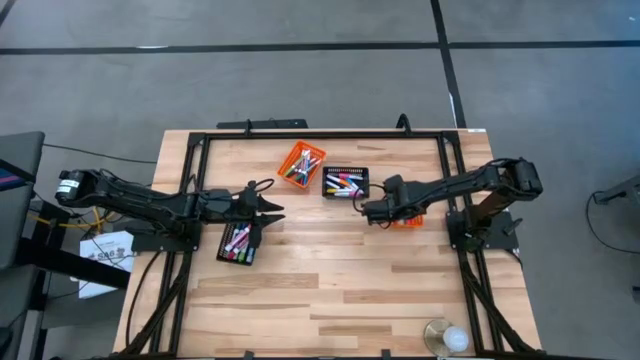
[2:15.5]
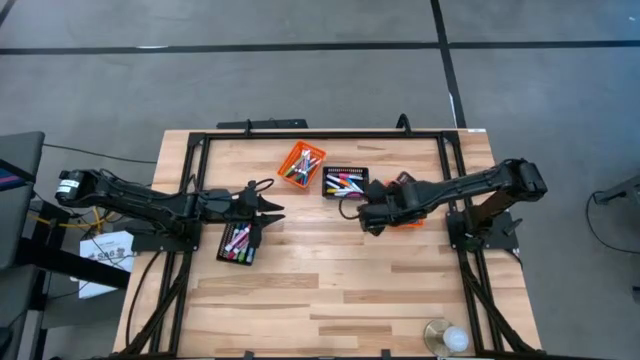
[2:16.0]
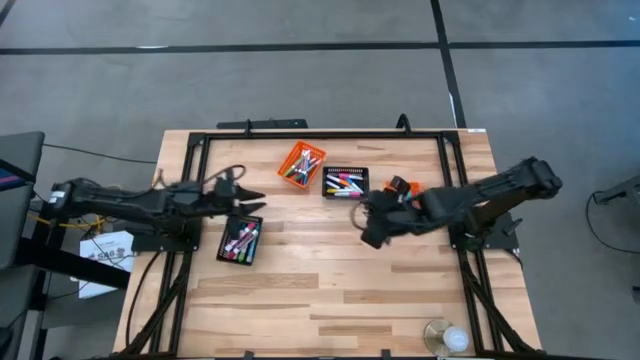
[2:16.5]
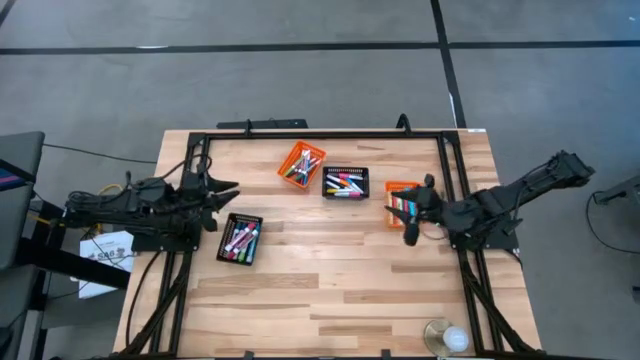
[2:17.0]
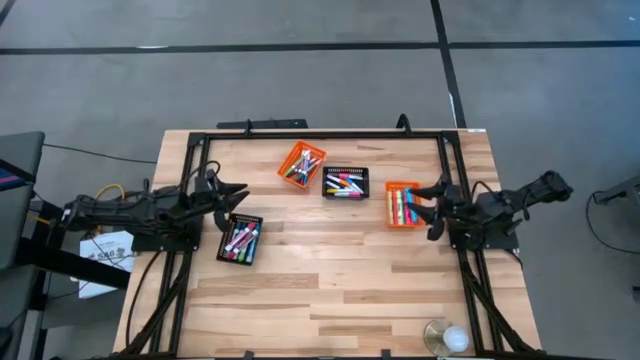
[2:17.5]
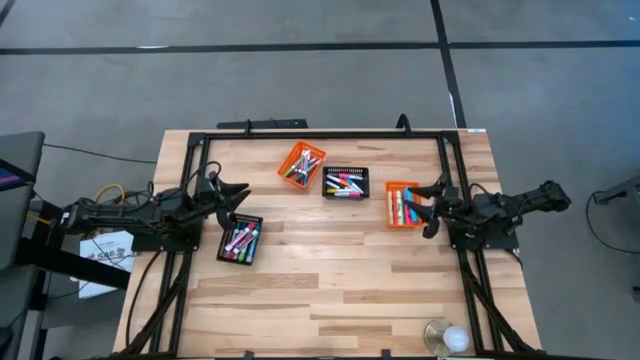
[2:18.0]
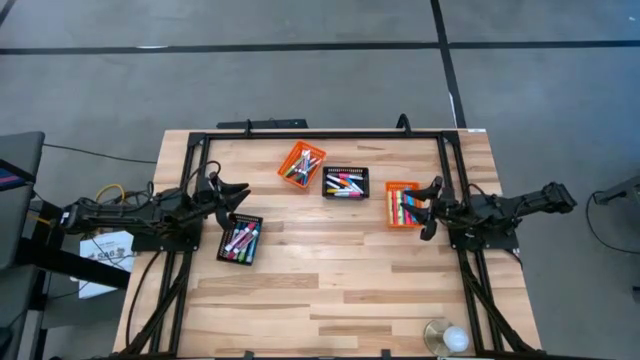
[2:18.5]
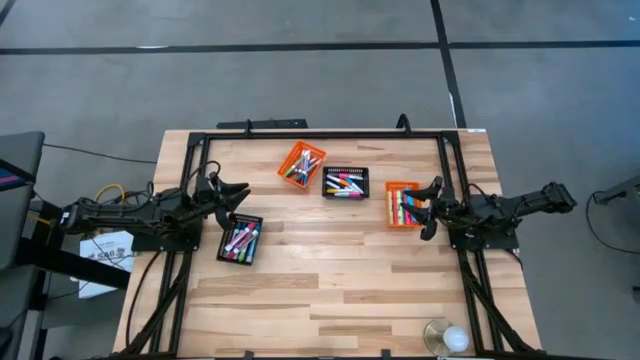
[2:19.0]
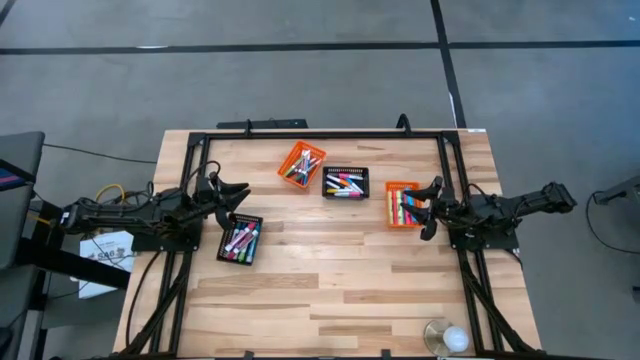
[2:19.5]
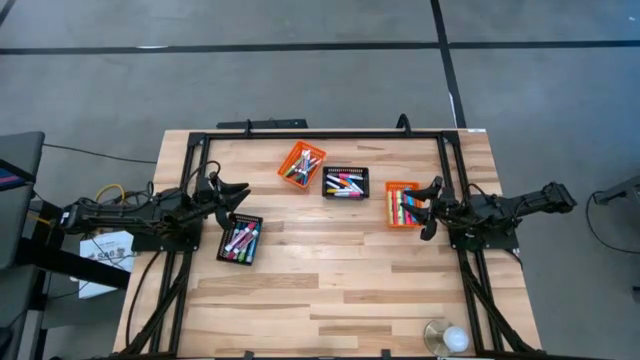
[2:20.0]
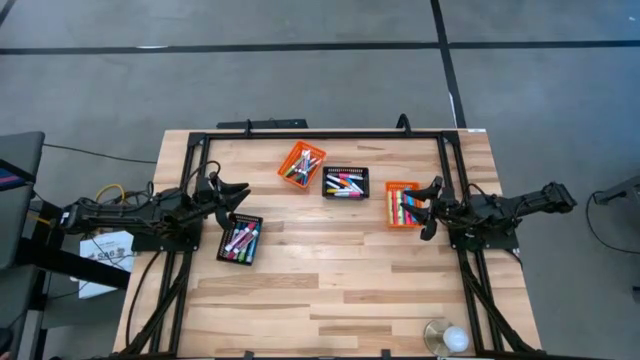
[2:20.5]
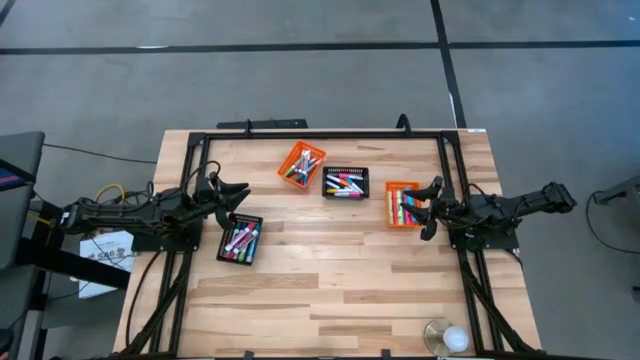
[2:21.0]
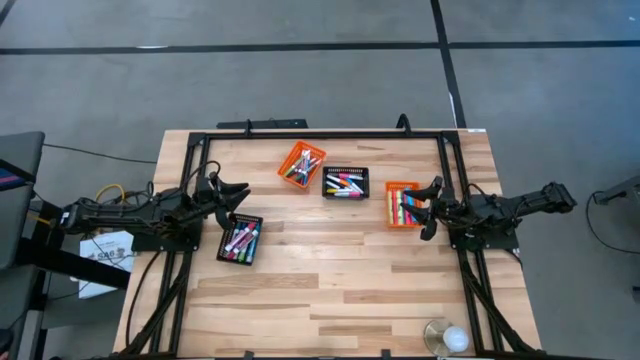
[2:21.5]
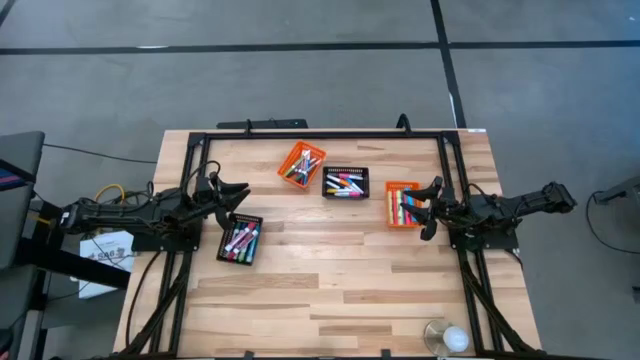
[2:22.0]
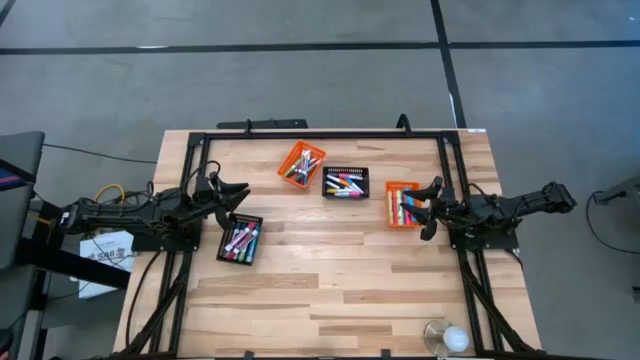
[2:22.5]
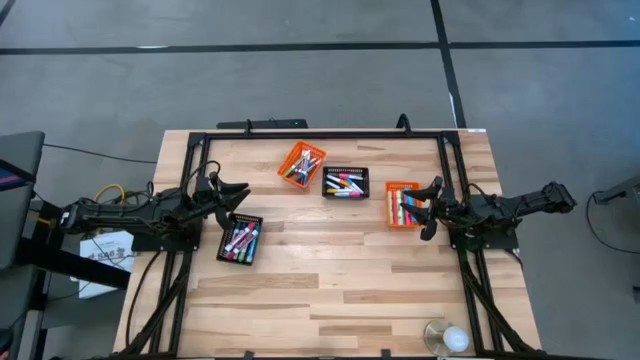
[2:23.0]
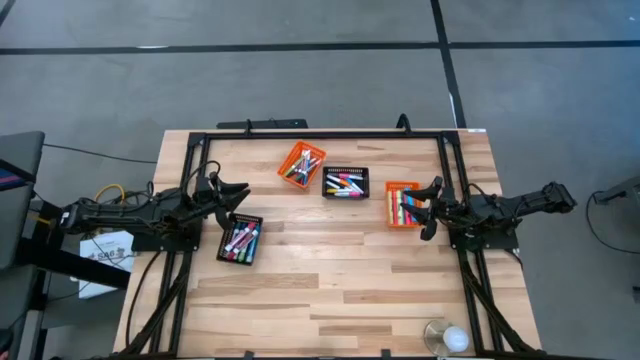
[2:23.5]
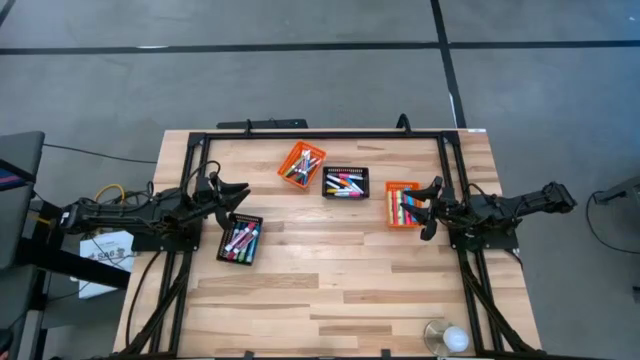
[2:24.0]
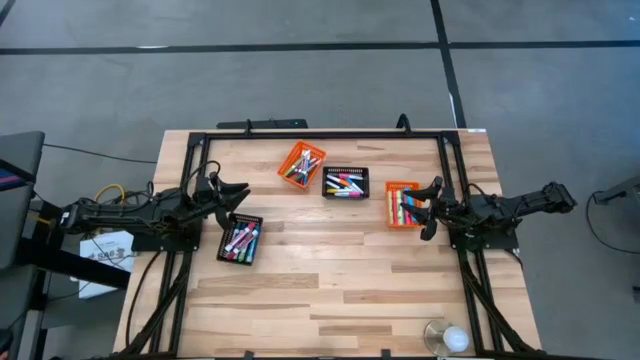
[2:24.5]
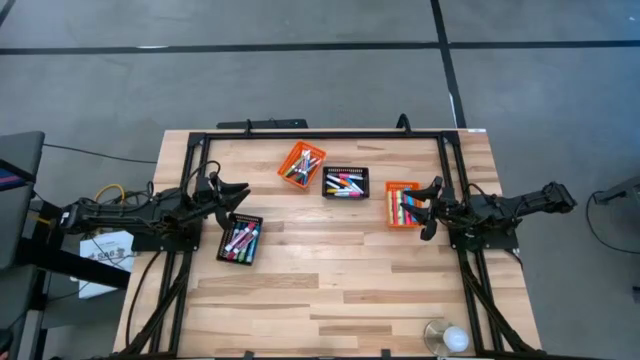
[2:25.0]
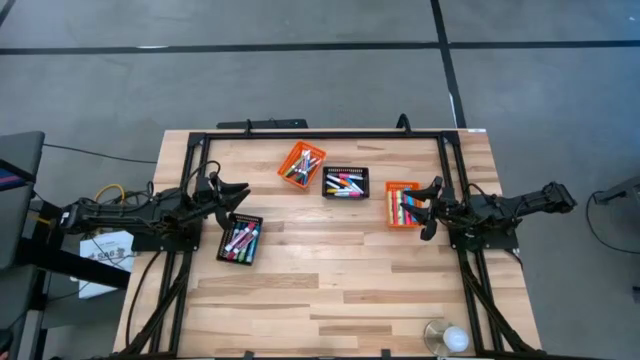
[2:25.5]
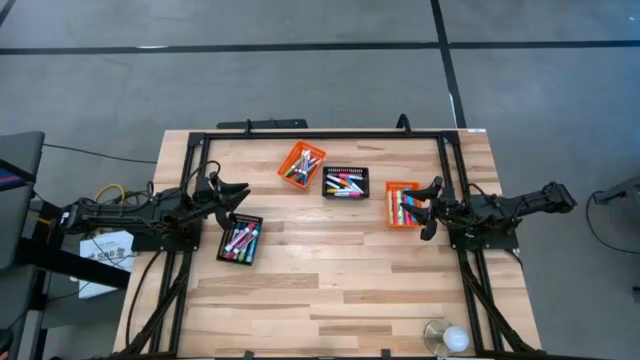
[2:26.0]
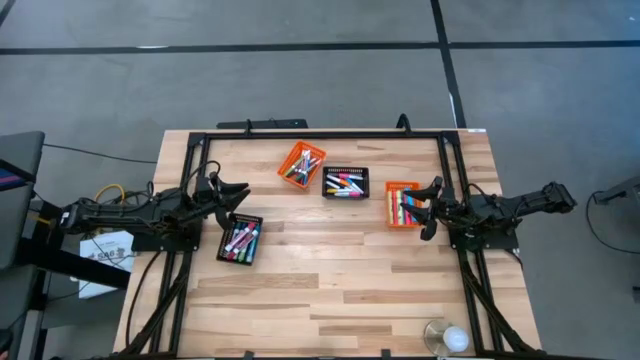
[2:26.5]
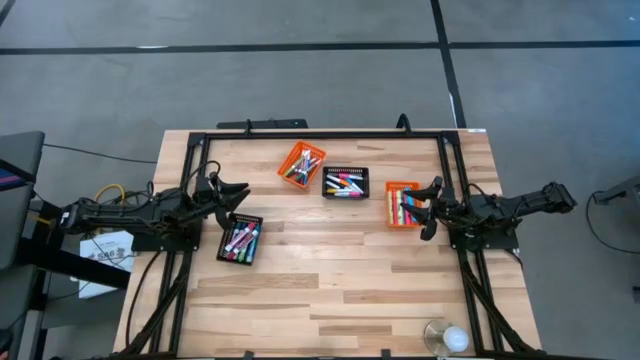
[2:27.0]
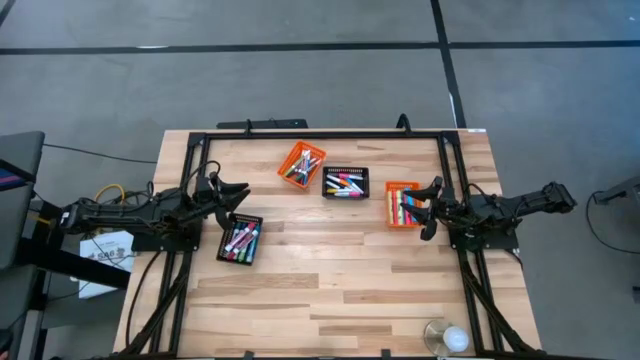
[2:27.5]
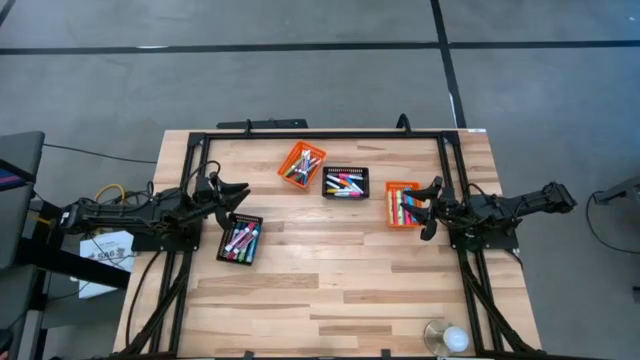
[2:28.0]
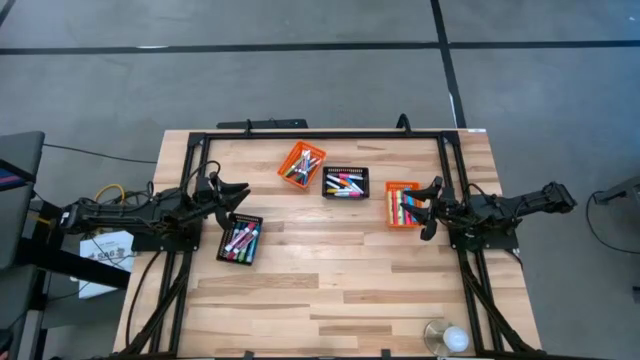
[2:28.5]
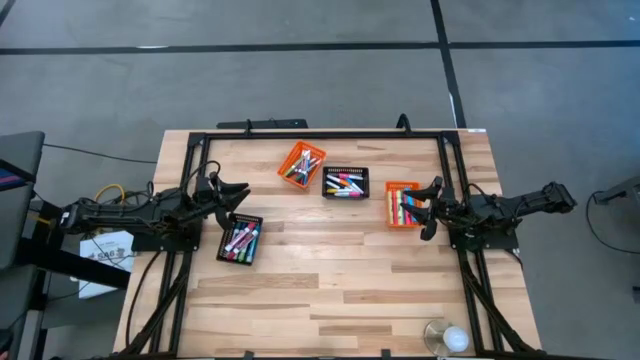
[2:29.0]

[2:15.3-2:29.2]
Task: Pick & Place Markers
Return to Home Position

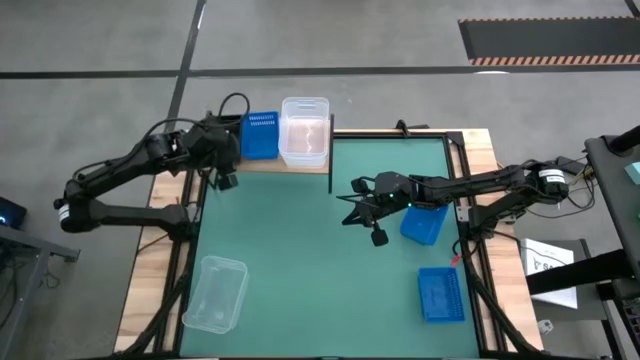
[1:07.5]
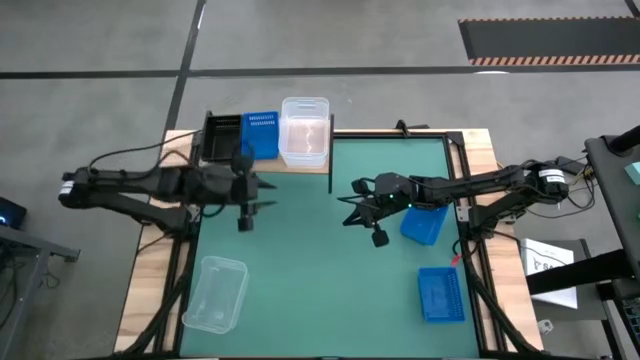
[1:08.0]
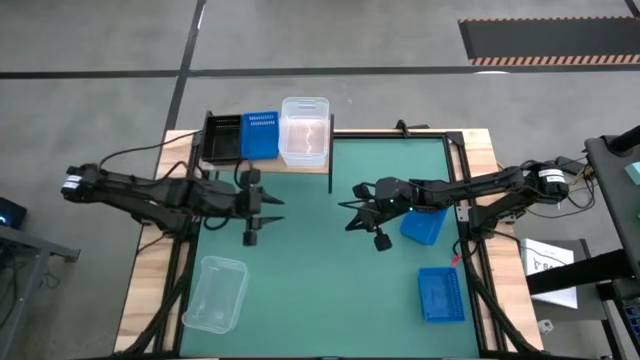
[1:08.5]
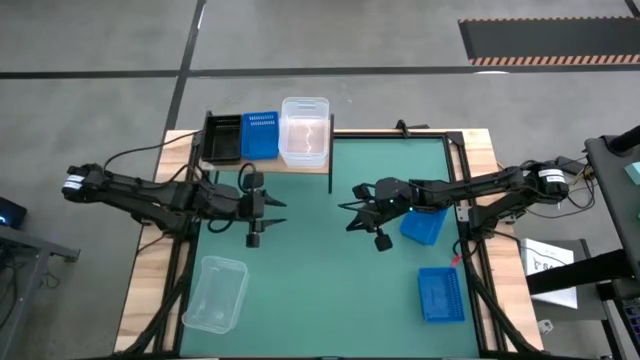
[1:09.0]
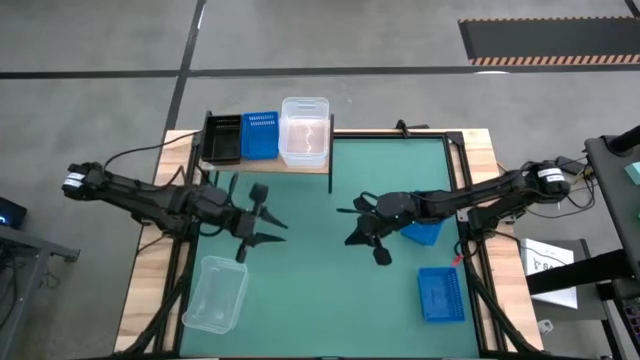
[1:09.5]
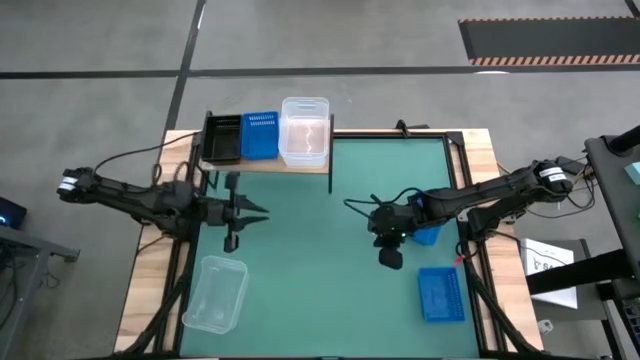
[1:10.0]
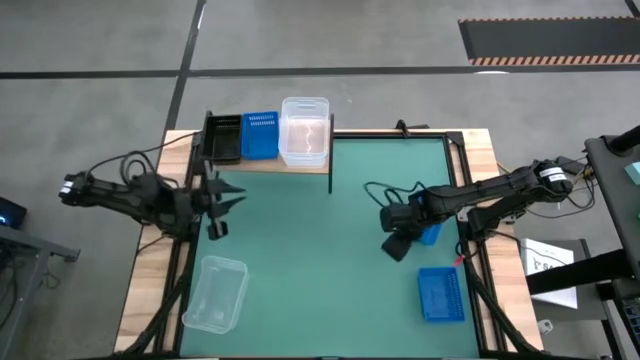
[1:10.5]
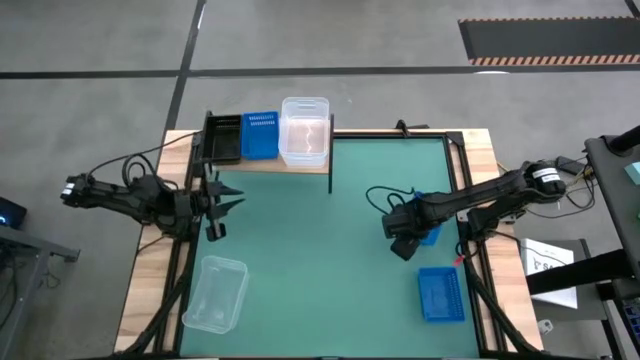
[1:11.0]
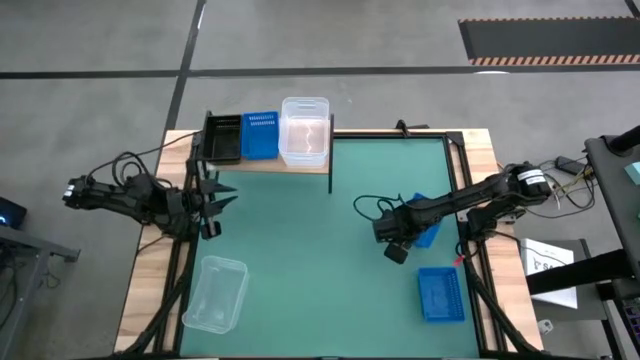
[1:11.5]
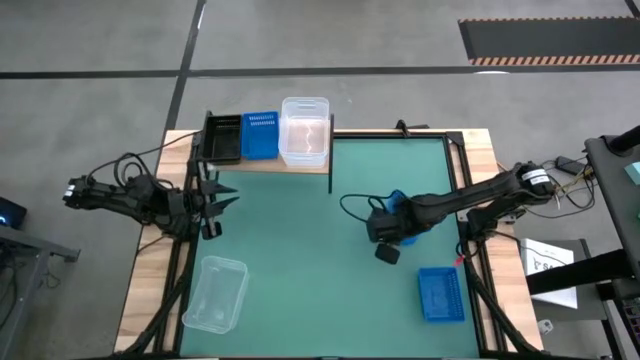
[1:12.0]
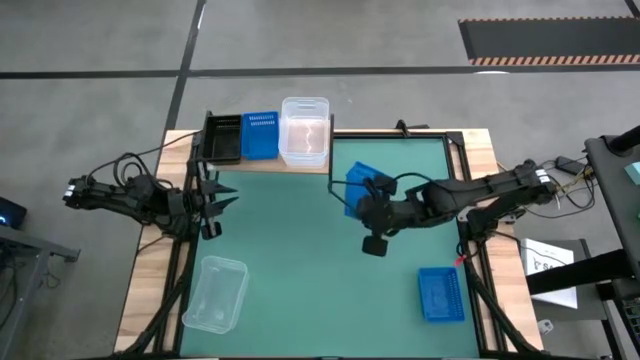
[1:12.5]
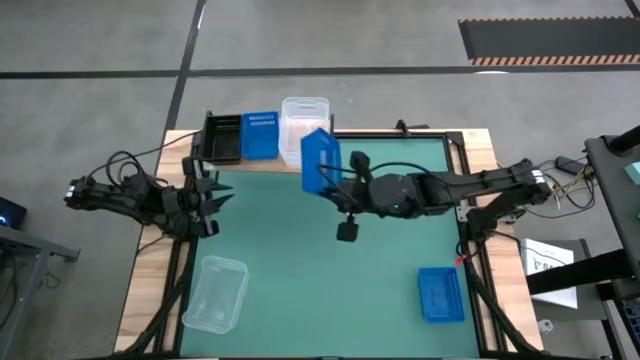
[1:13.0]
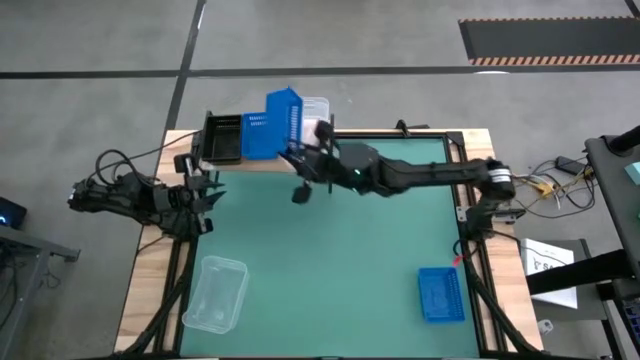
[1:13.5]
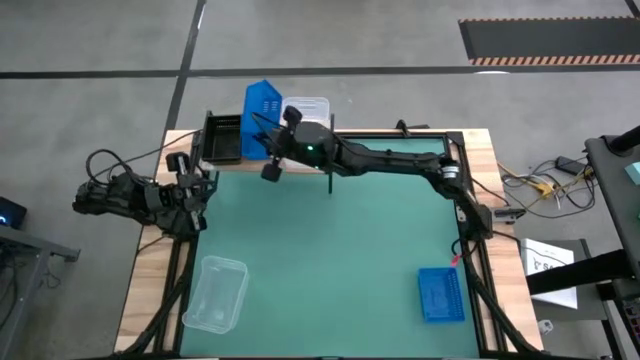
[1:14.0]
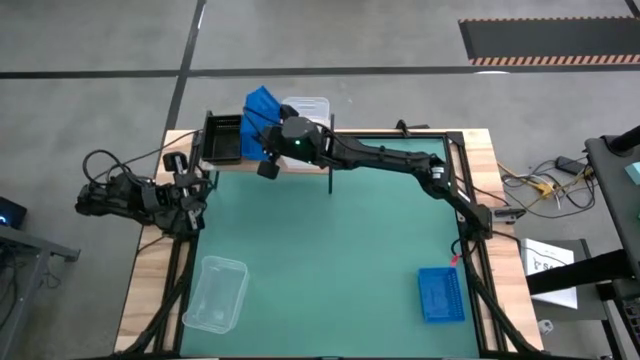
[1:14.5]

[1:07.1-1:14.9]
Task: Stack baskets on shelf by color
Stack the top blue bin on top of the blue bin on the shelf

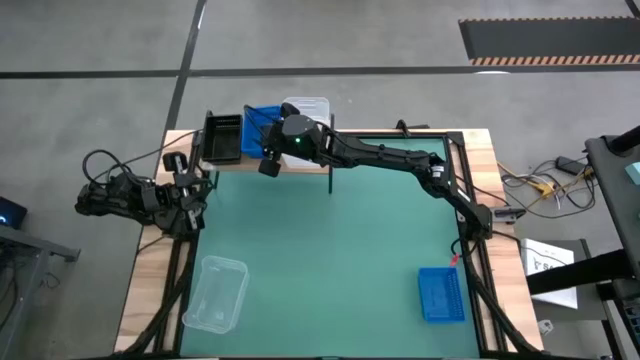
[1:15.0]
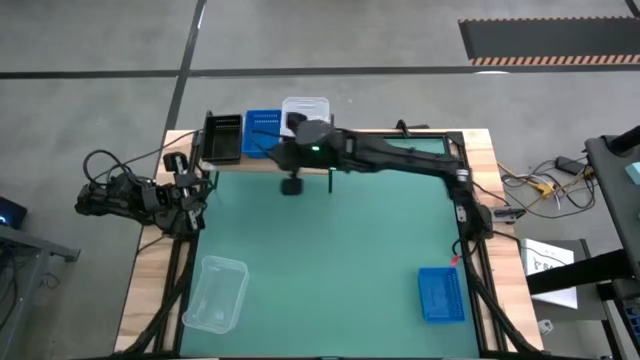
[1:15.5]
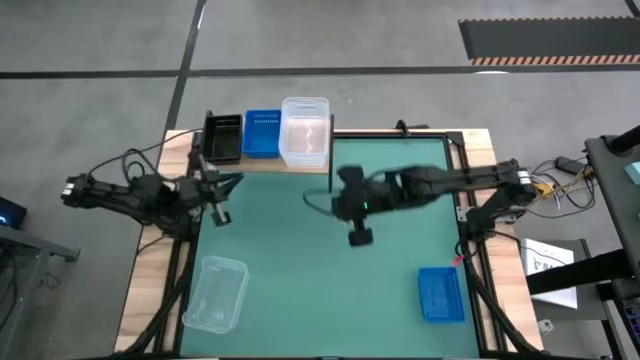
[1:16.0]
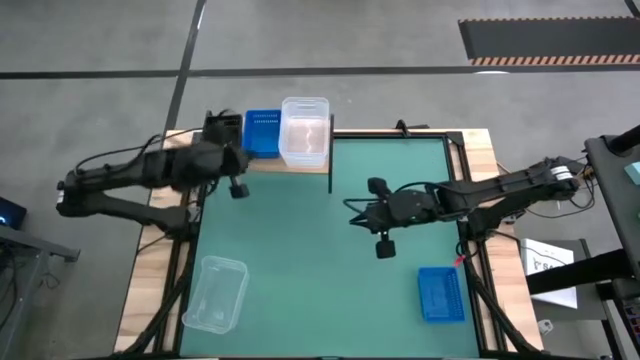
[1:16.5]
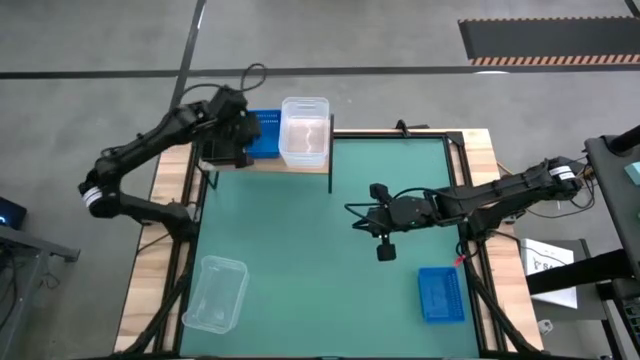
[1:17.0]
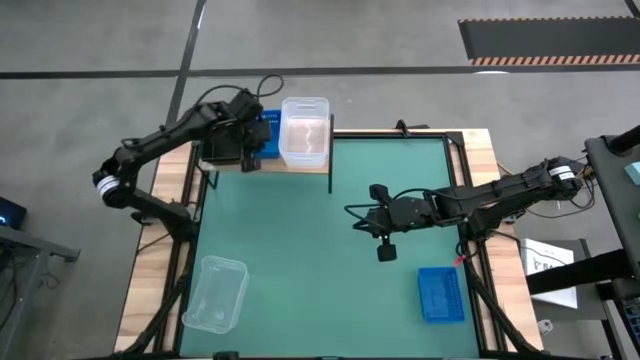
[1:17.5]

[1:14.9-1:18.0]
Adjust the blue bins on the shelf
